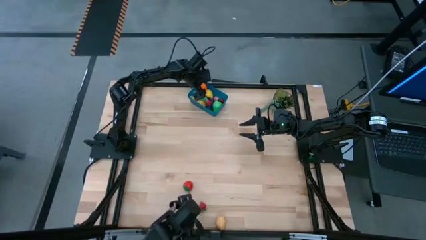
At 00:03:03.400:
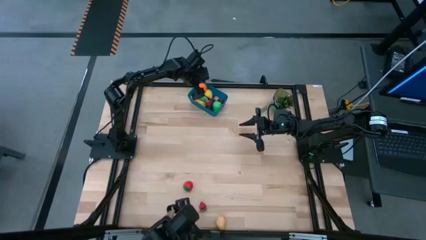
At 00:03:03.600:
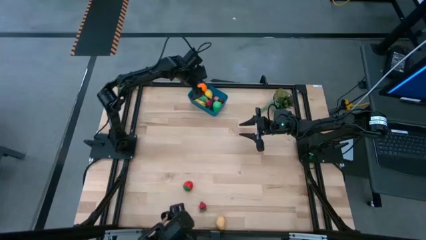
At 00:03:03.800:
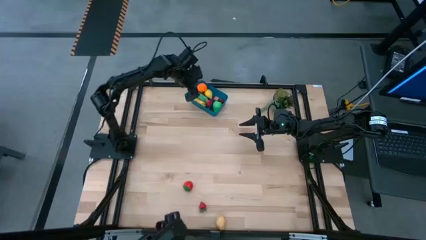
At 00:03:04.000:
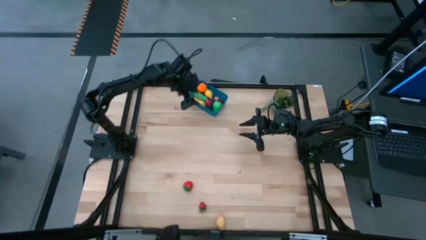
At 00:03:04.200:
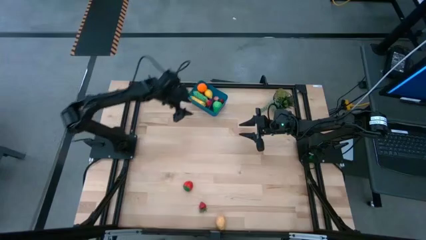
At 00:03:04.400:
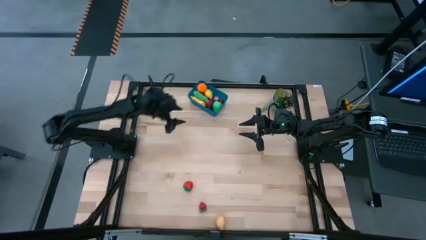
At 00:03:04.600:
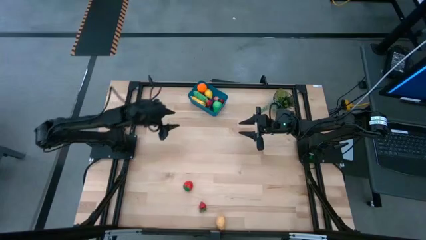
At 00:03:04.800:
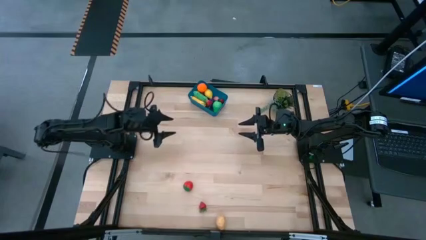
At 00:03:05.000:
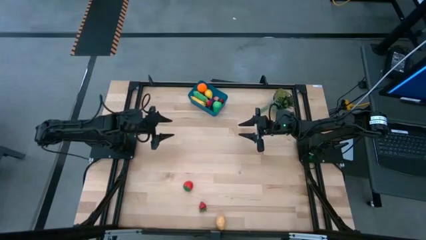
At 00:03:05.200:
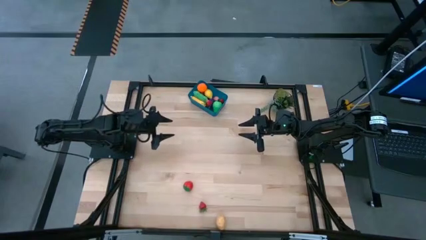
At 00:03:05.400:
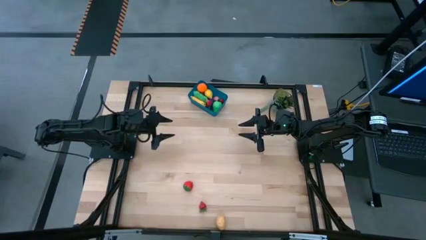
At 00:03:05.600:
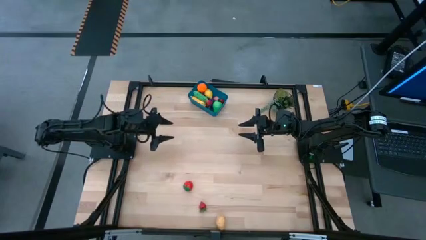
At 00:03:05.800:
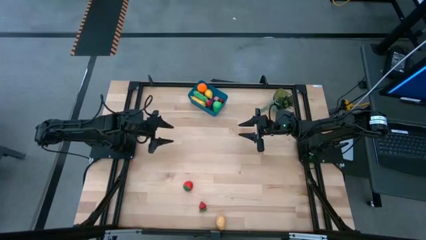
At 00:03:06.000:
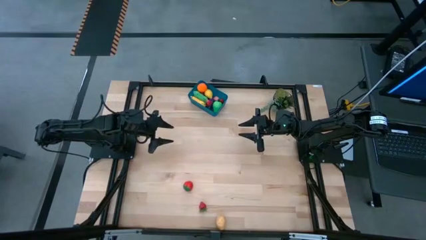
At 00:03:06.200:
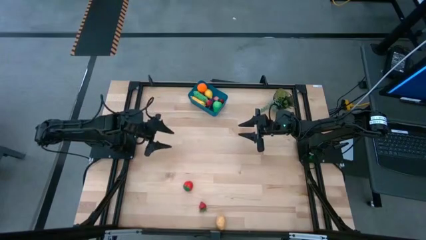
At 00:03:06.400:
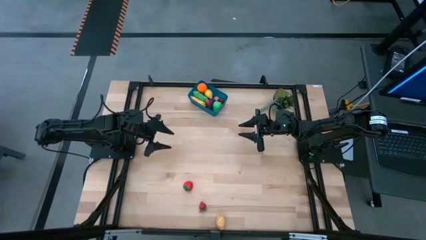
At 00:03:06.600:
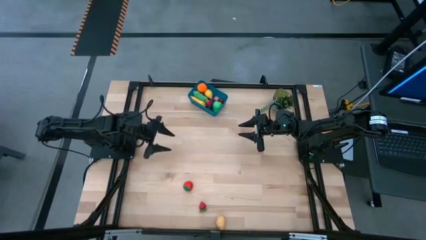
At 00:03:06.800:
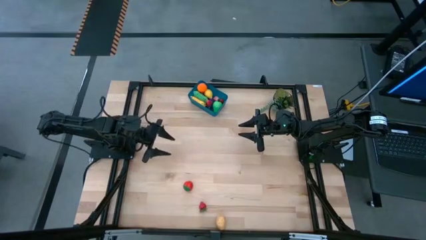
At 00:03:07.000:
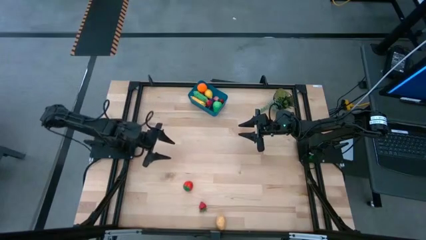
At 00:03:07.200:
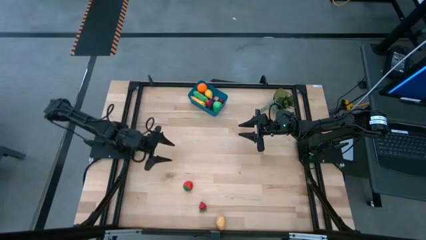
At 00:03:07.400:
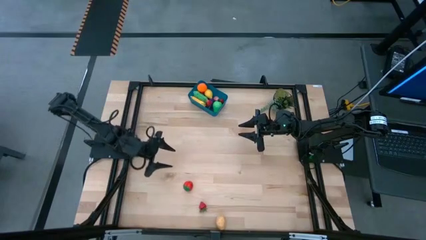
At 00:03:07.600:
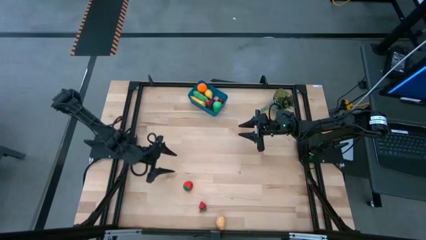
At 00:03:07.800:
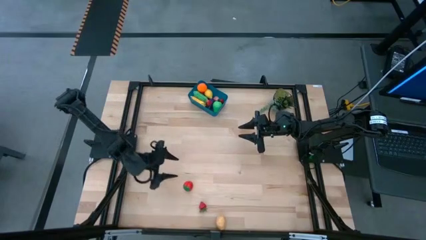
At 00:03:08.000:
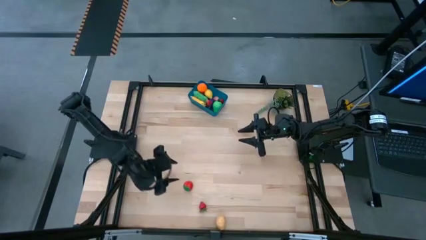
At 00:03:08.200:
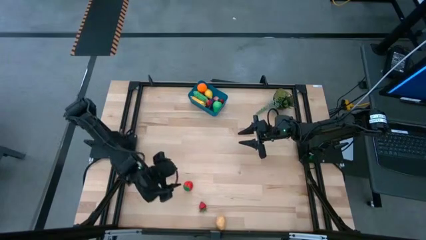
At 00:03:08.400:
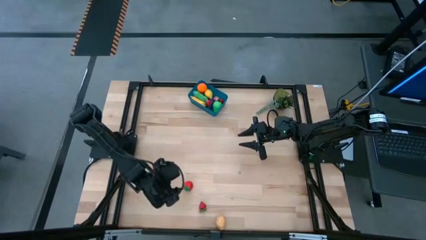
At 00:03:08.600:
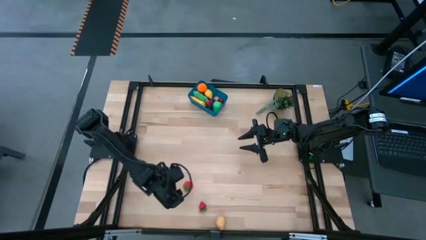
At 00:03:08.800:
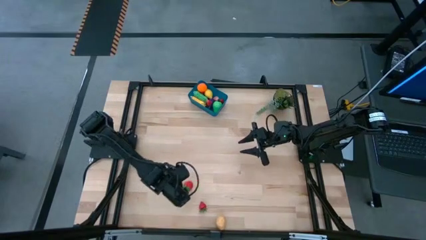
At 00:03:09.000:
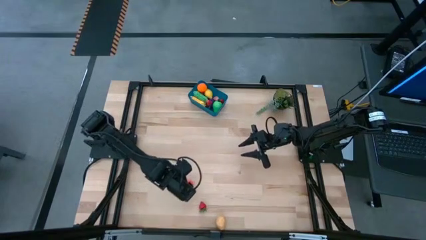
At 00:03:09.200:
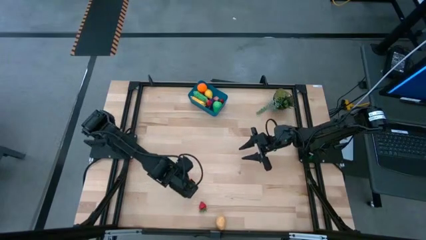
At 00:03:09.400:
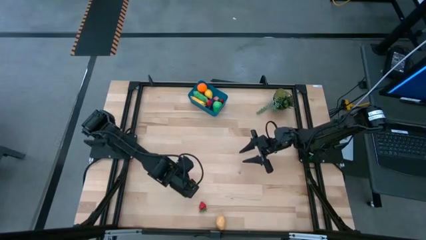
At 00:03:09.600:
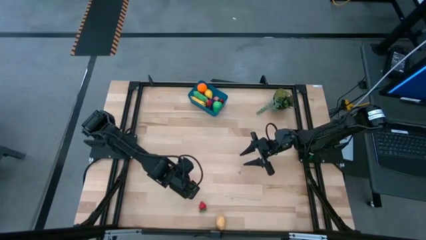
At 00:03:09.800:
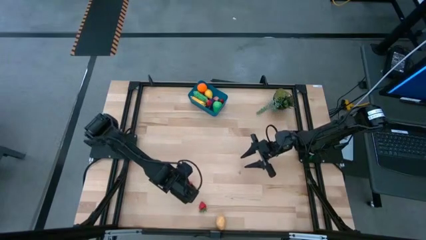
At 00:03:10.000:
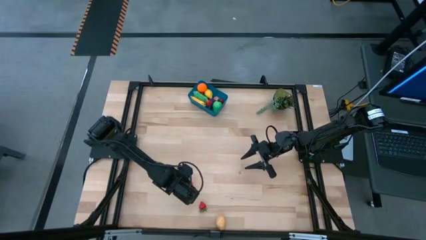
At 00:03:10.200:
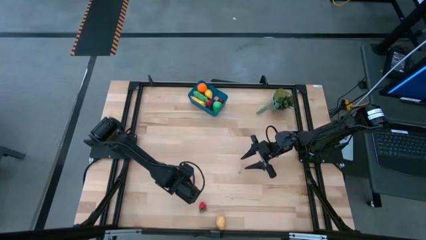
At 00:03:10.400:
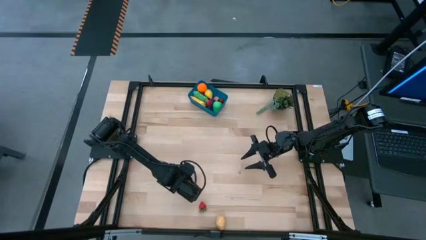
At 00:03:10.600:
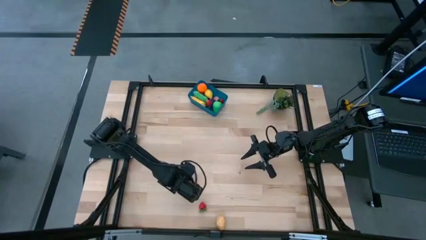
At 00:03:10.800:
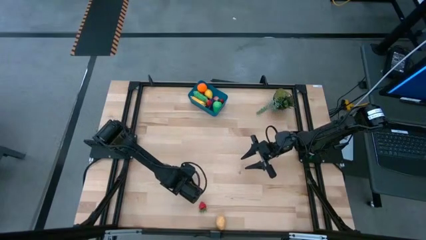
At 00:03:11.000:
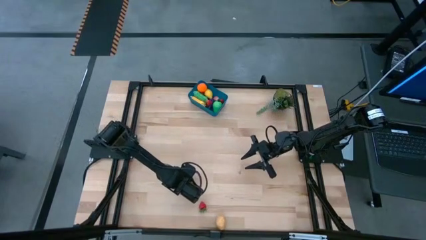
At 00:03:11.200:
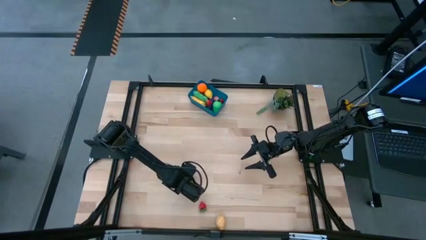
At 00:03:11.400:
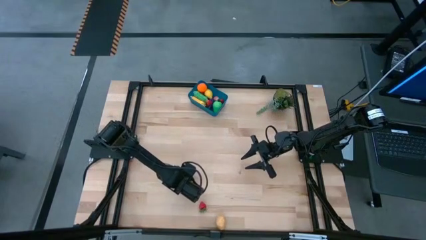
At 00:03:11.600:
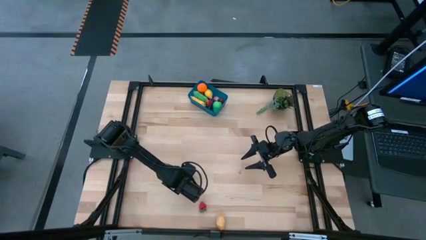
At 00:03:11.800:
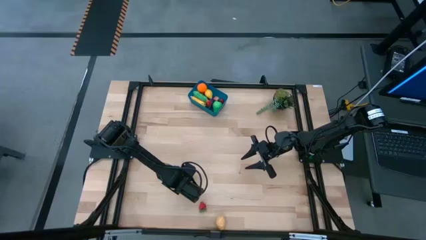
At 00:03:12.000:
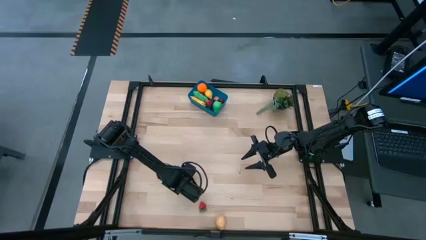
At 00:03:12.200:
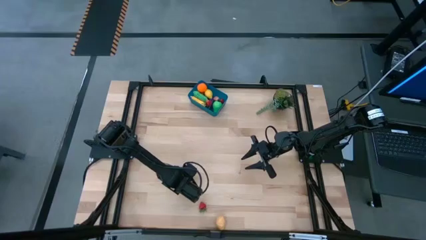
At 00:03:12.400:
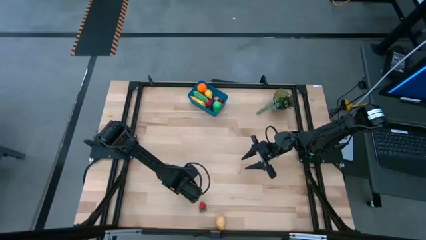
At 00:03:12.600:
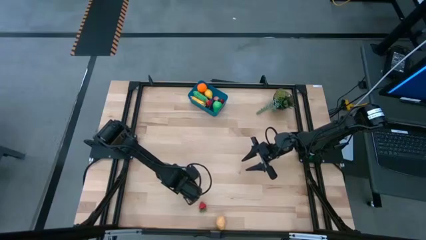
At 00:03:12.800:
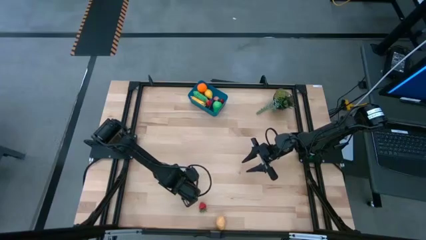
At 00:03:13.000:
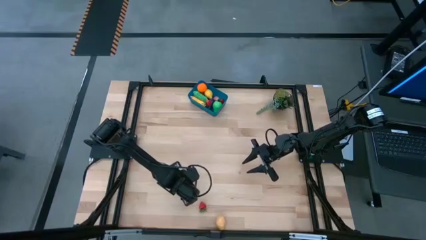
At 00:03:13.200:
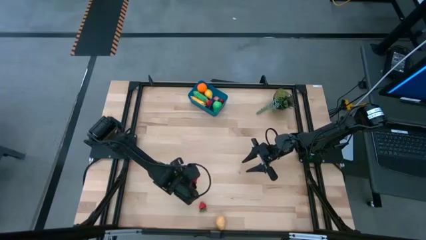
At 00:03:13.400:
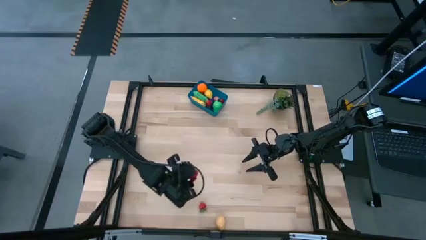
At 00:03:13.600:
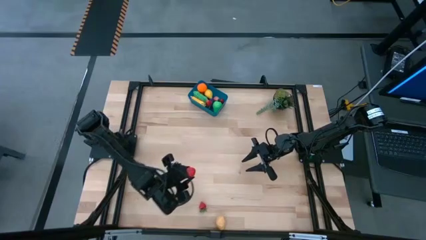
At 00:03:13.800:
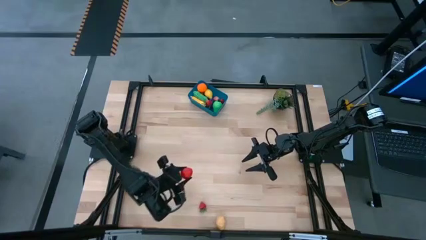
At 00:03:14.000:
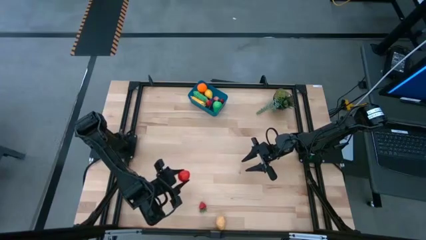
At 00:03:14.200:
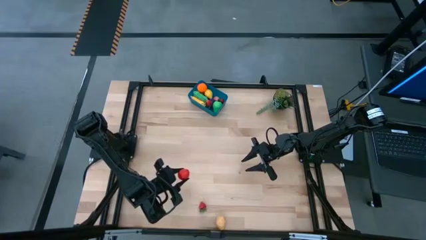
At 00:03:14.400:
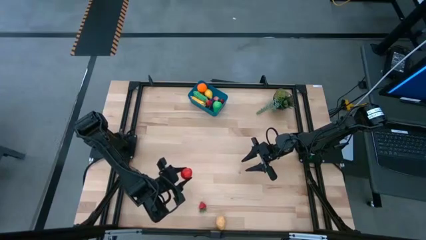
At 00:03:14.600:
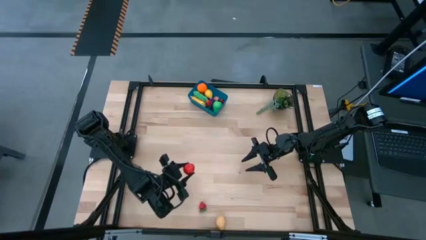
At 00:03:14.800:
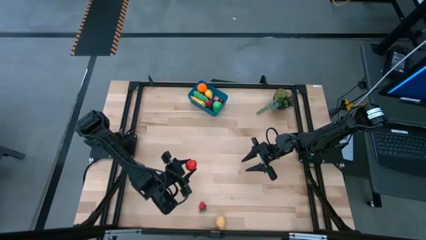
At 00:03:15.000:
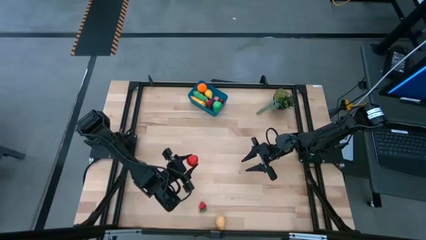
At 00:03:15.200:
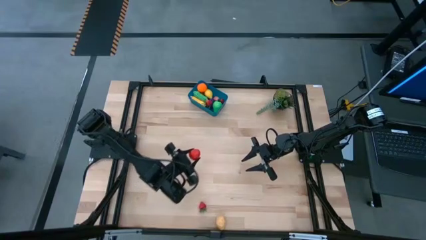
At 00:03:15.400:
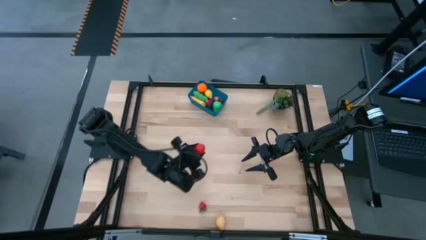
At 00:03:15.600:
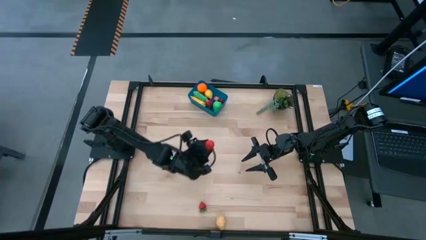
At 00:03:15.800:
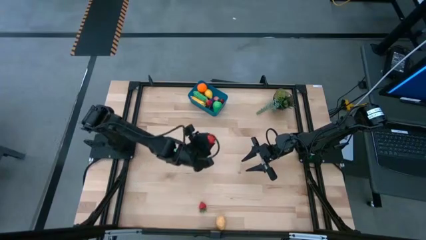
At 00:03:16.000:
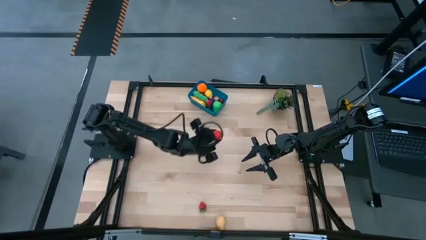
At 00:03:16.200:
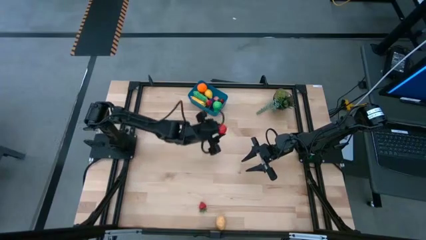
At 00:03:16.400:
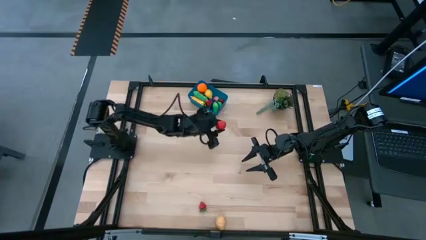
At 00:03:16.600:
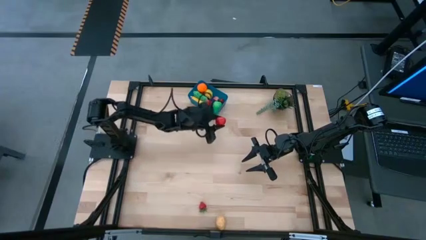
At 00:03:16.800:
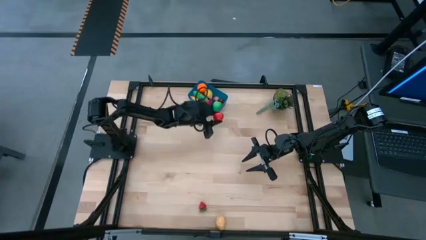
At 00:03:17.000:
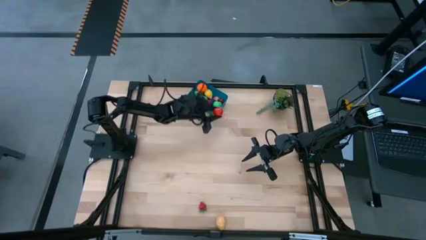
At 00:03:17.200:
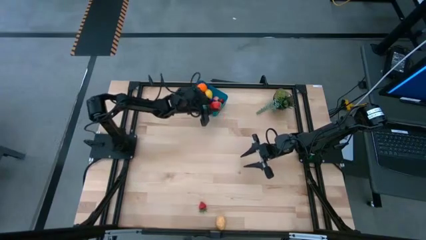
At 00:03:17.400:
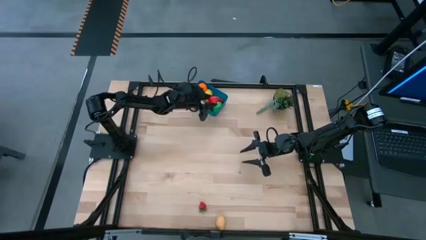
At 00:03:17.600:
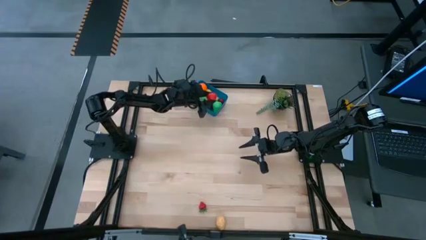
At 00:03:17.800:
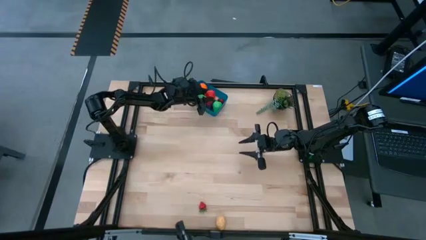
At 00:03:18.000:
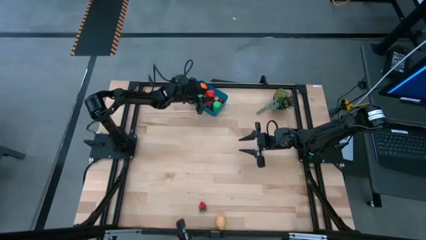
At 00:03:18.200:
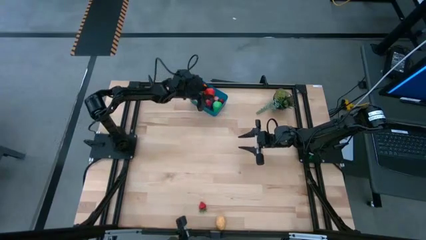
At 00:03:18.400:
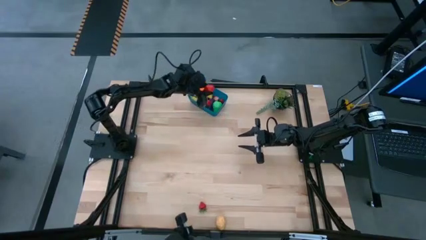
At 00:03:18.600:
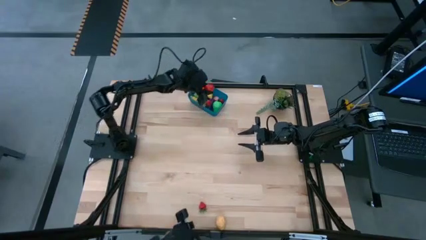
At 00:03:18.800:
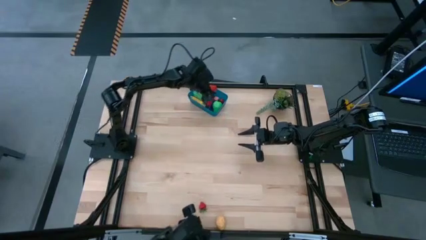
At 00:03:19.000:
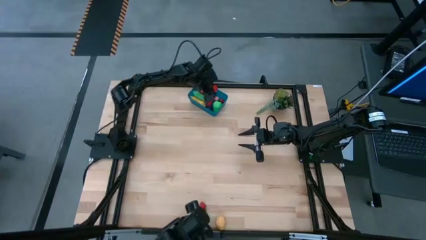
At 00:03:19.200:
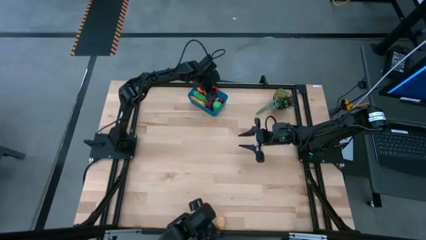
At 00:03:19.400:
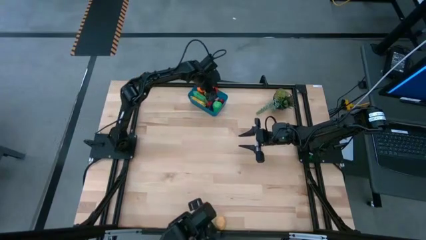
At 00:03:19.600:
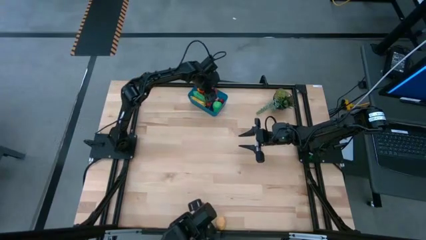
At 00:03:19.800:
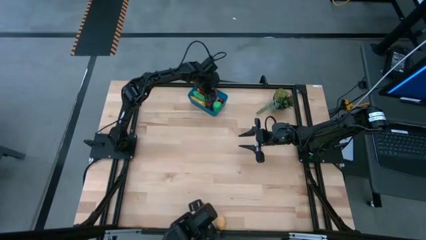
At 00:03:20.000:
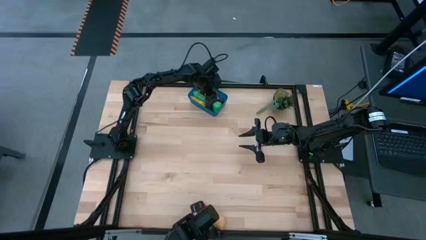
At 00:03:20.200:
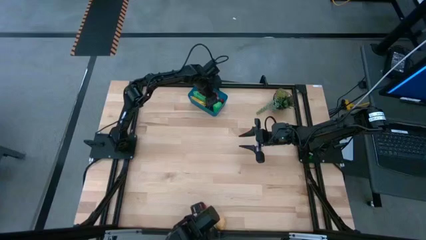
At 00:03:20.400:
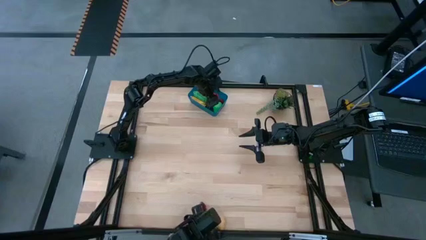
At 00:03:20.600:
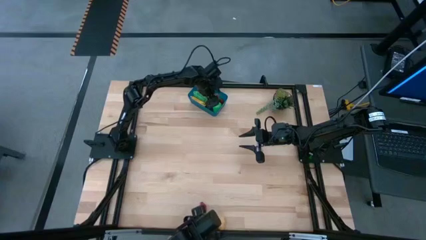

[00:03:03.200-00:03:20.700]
Task: Pick and placing Produce into tupperware
Put the red strawberry into the blue bin
